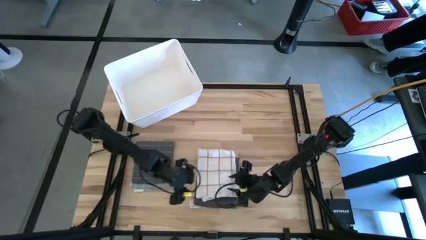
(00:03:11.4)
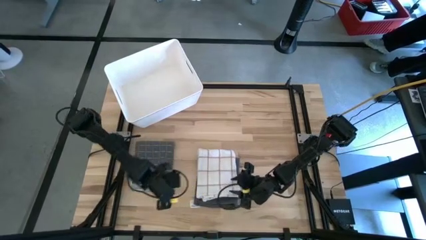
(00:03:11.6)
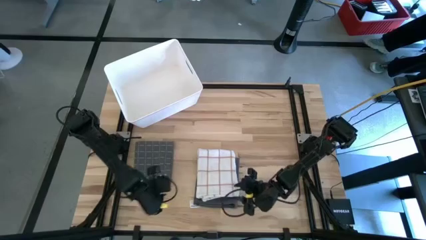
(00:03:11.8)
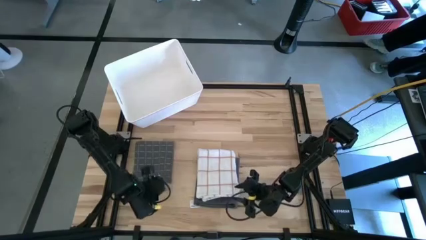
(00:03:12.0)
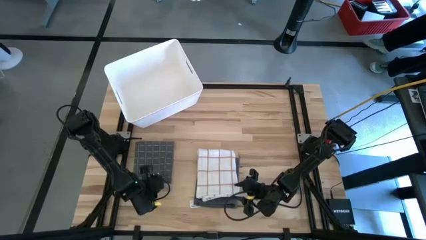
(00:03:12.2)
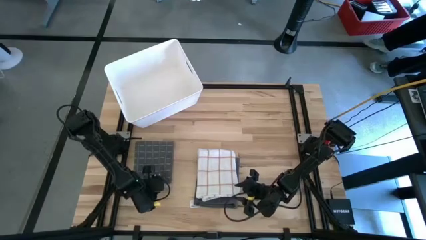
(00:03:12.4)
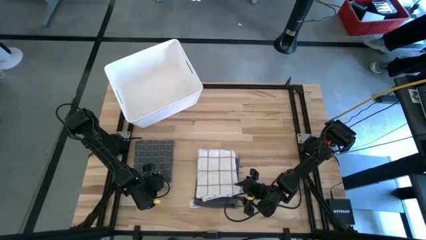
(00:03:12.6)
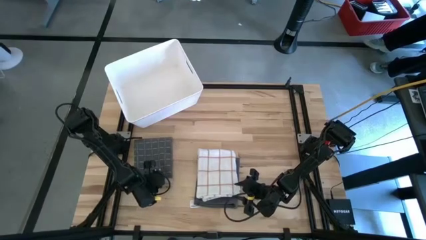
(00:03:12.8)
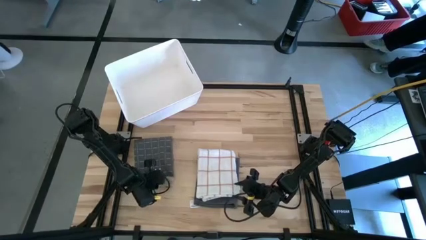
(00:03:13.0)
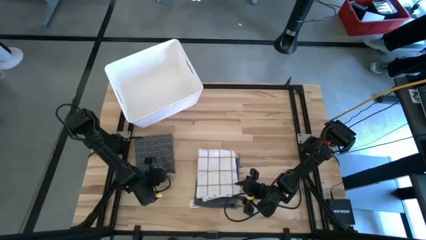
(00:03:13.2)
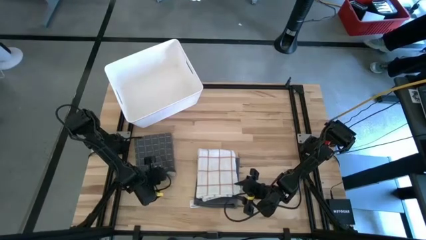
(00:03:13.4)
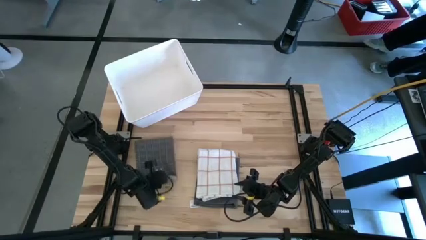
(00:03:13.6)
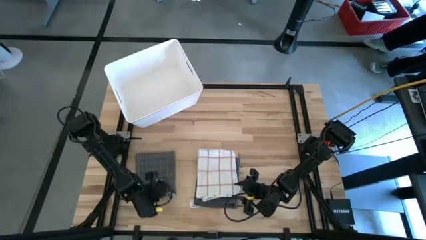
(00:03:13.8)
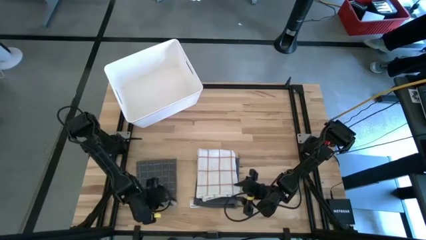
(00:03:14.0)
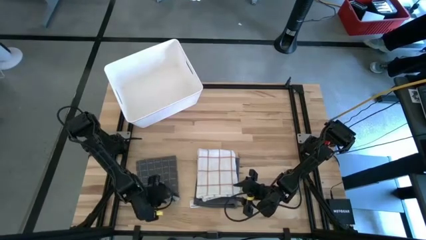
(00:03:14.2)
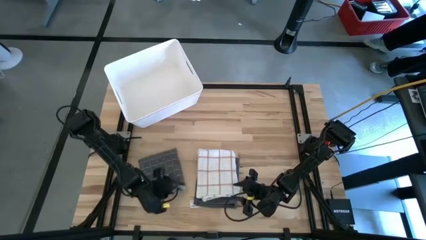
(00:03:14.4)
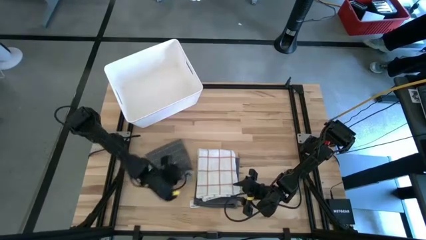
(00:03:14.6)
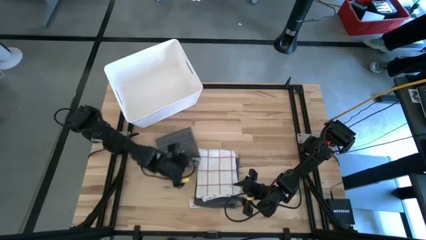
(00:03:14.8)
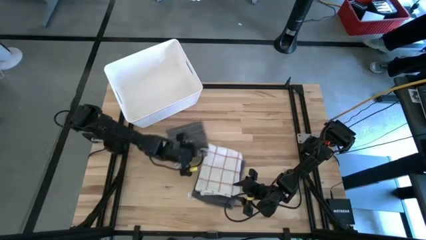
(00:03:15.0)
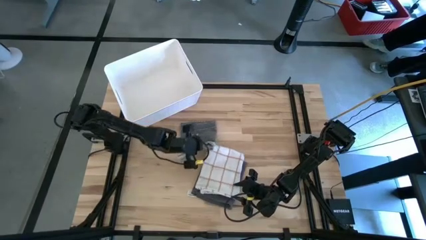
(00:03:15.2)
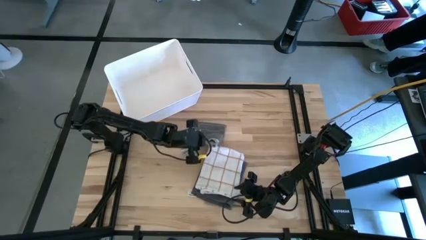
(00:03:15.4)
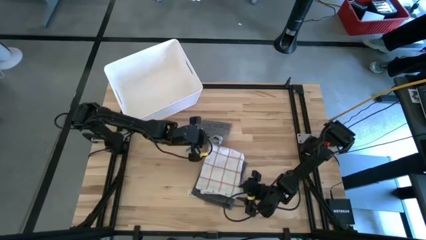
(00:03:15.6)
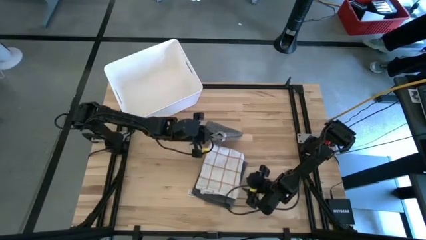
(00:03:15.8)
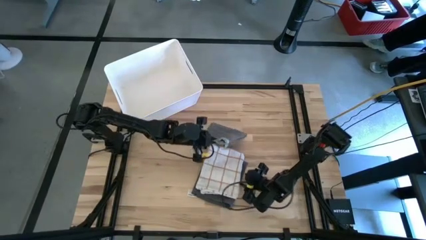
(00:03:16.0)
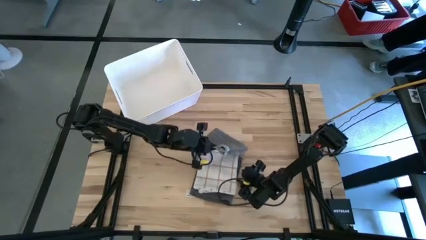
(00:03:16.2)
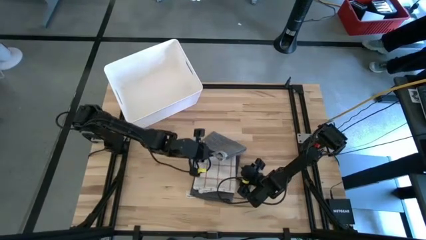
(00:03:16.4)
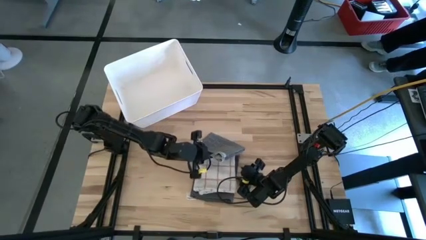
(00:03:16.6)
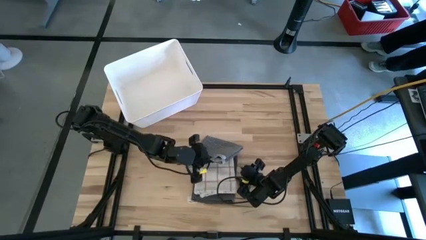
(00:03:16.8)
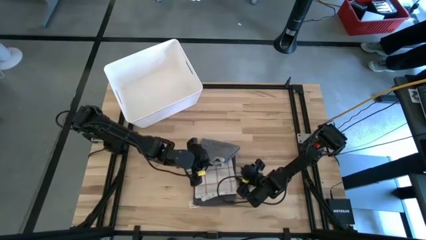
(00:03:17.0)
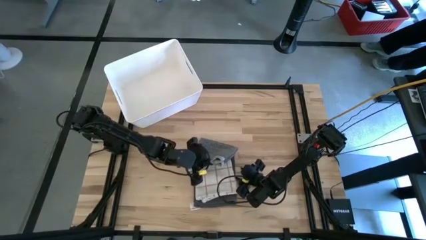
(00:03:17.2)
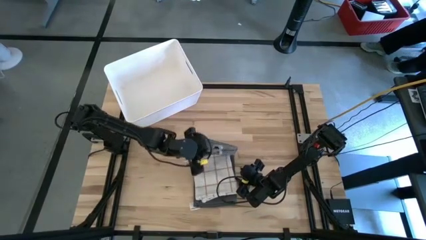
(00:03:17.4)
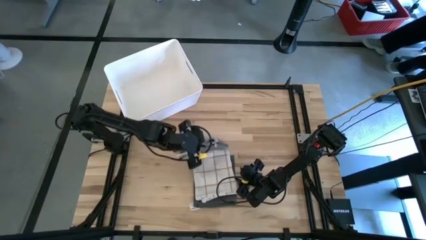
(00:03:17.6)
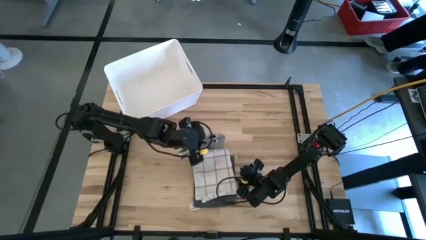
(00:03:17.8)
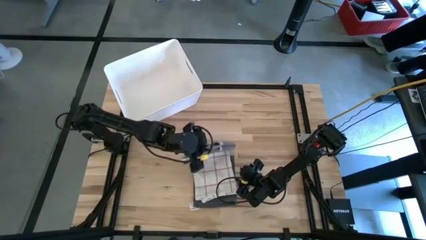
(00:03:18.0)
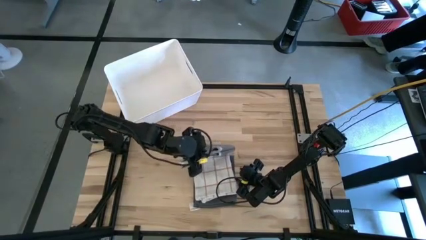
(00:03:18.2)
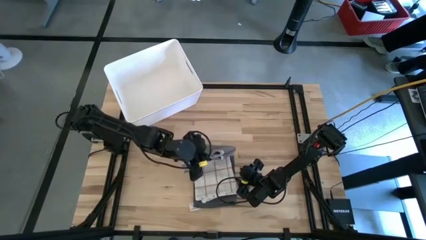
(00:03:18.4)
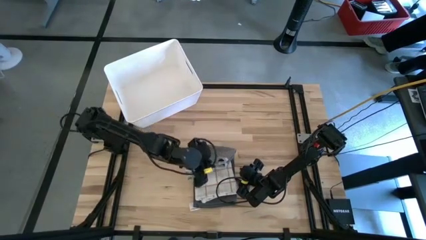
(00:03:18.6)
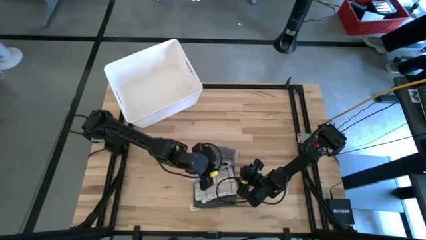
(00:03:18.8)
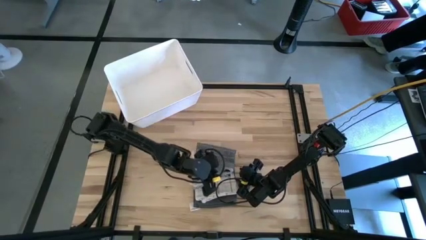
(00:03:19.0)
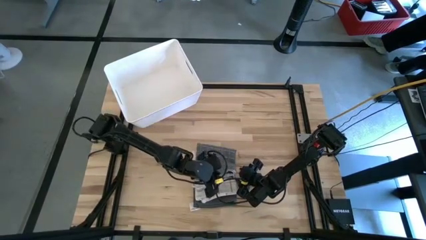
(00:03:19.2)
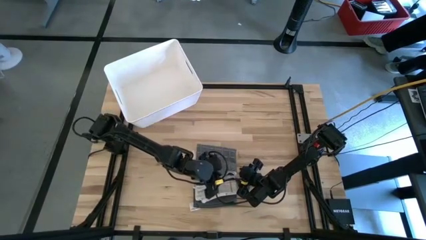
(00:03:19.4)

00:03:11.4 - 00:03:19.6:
Task: Fold towel
Stack the folded gray checkered towel on top of the folded brown-white towel

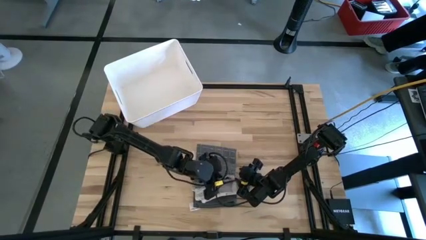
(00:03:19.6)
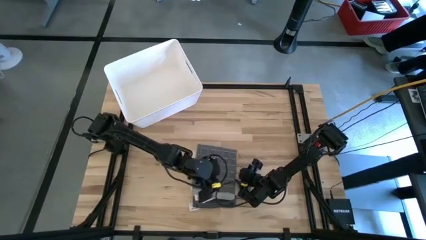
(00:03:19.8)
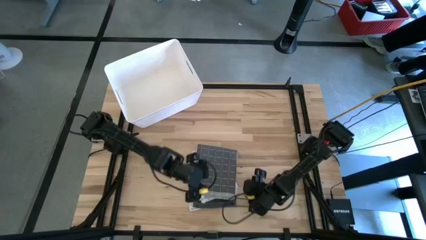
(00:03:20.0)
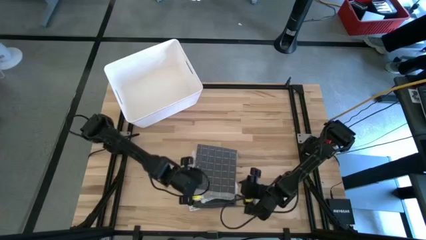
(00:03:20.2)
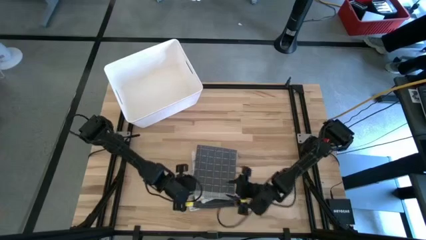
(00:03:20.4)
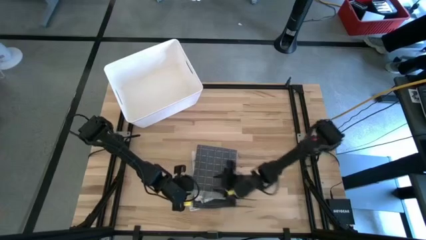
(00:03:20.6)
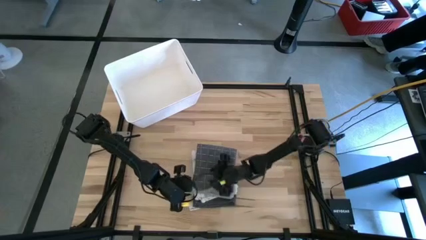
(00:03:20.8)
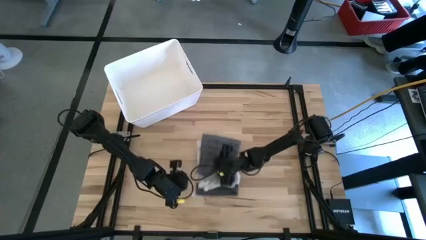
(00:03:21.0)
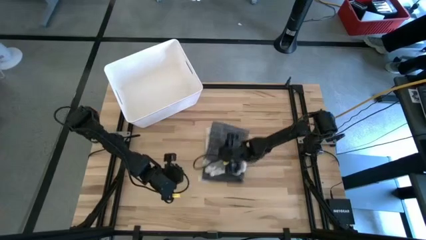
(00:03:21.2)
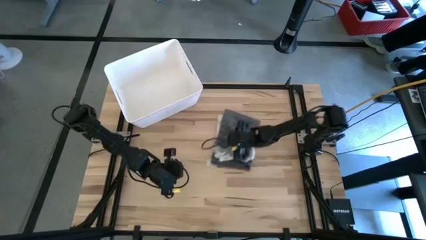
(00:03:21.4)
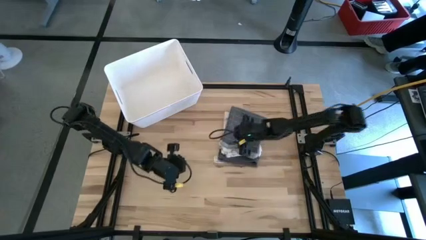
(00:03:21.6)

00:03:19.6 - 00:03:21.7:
Move the stacked towels to the top right of the table

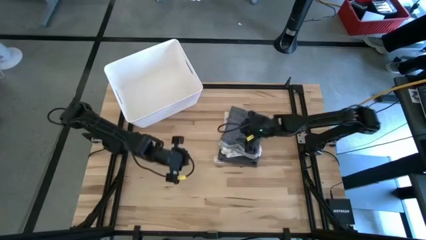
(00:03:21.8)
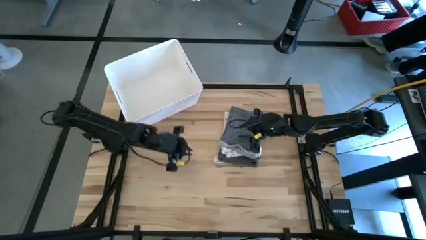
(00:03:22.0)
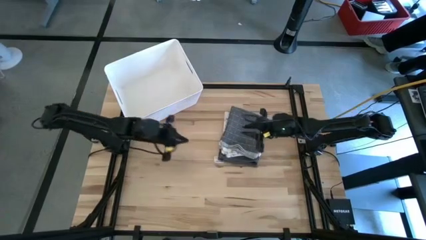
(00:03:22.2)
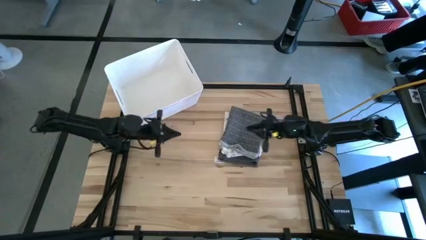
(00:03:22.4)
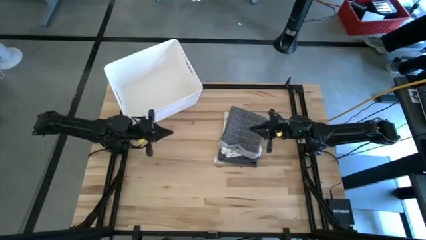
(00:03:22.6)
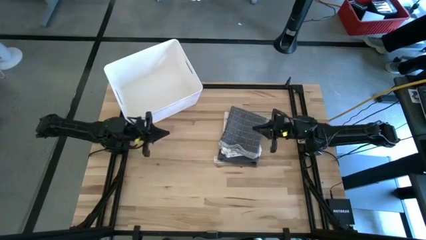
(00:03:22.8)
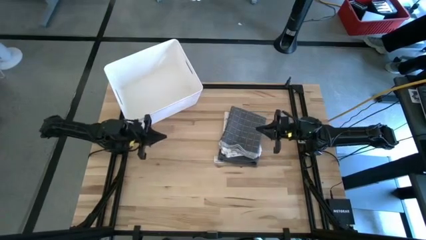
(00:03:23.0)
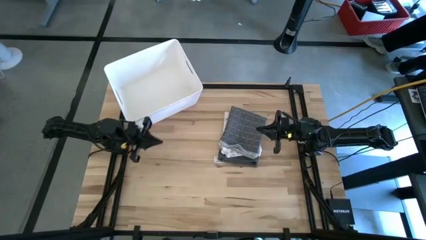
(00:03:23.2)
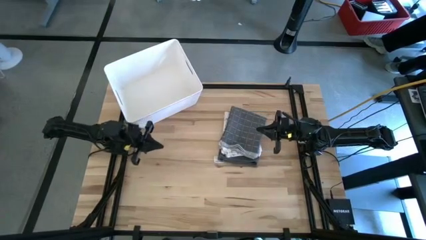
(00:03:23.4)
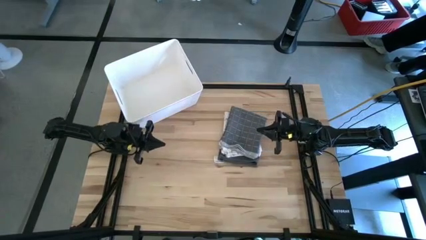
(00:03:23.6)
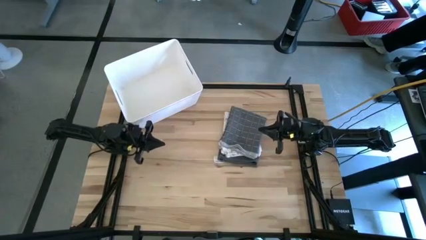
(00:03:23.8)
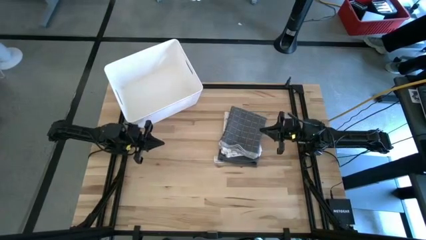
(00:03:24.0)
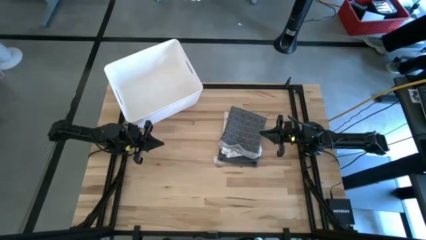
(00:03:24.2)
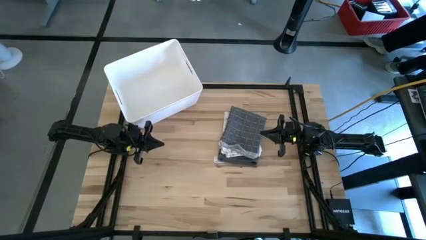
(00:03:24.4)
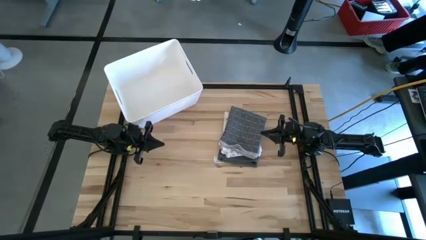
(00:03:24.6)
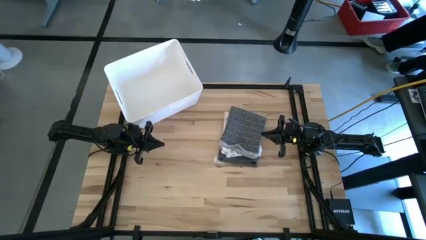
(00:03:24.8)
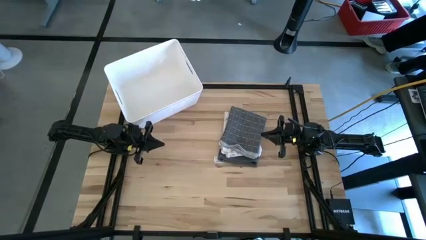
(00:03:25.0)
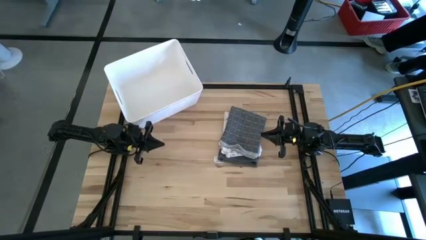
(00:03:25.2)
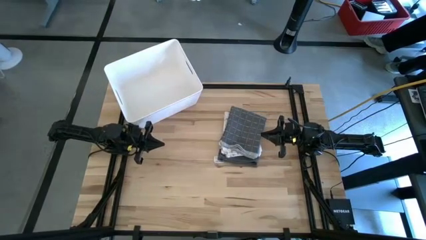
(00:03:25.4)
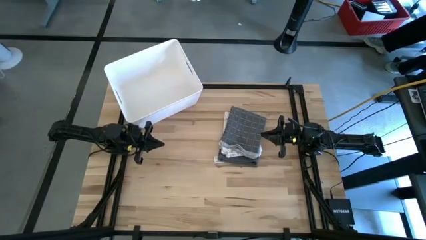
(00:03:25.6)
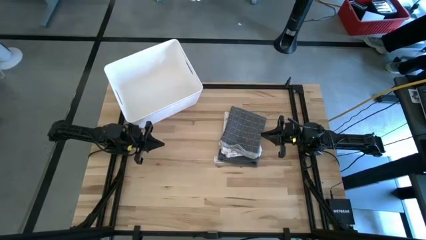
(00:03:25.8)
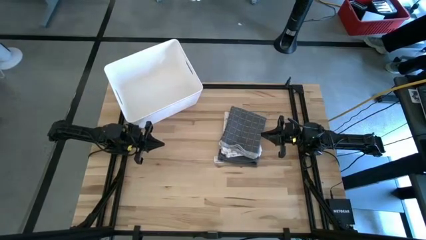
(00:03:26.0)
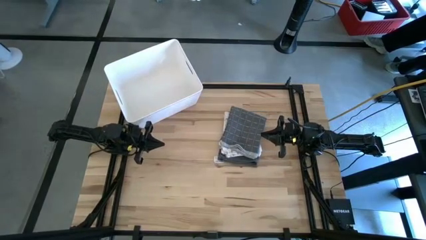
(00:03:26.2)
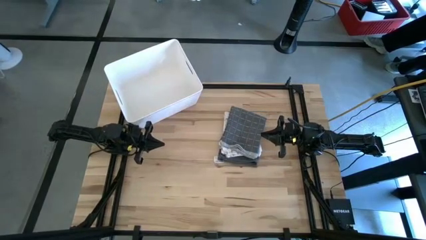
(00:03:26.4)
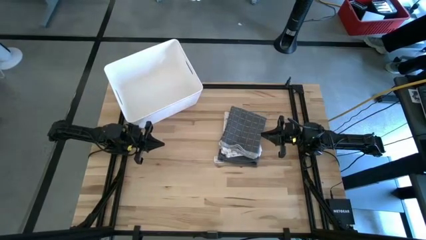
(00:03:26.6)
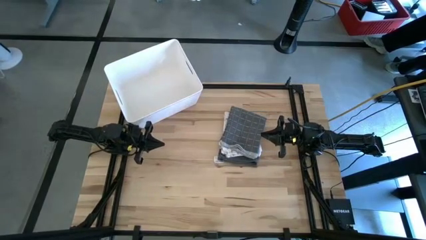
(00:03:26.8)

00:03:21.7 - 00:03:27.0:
Return to Home Position

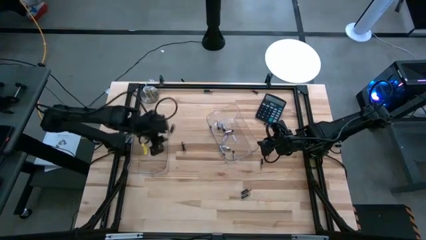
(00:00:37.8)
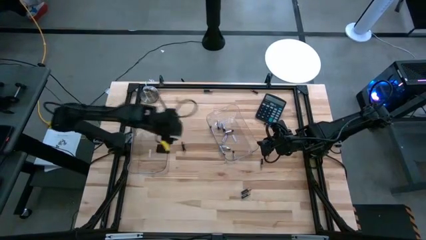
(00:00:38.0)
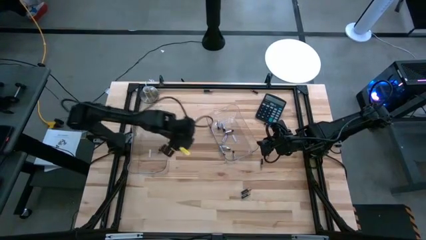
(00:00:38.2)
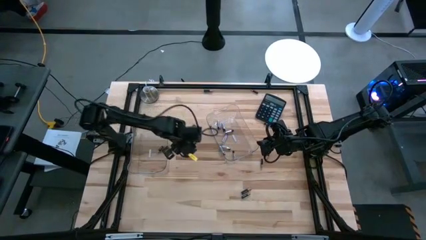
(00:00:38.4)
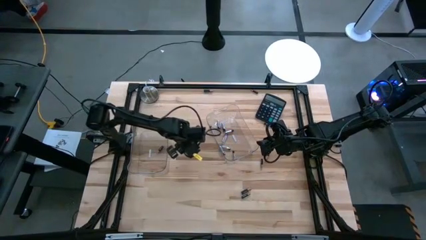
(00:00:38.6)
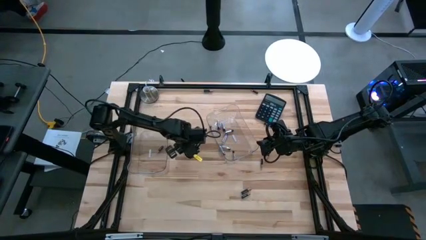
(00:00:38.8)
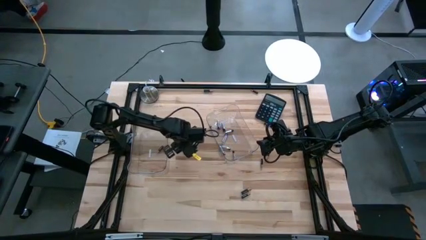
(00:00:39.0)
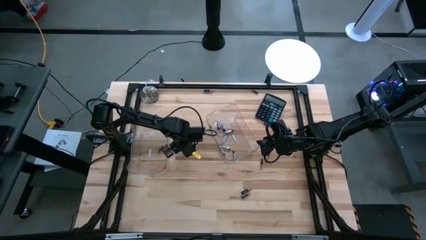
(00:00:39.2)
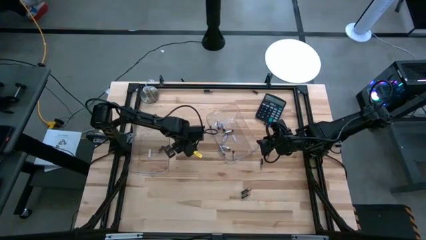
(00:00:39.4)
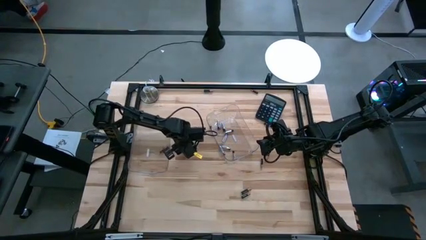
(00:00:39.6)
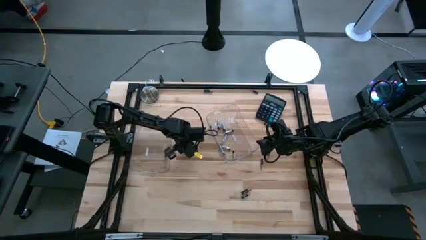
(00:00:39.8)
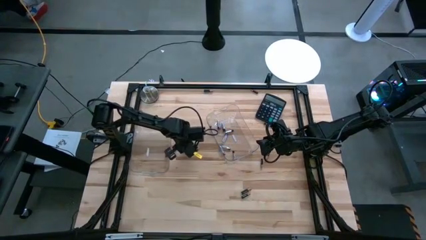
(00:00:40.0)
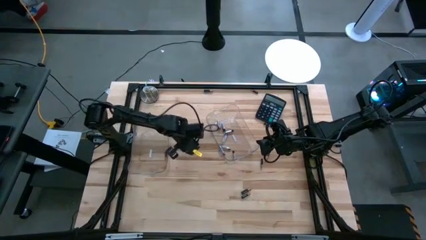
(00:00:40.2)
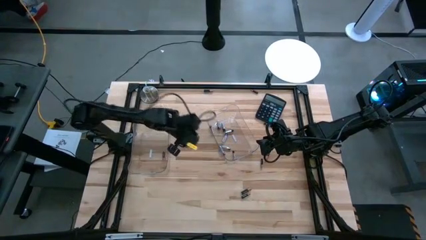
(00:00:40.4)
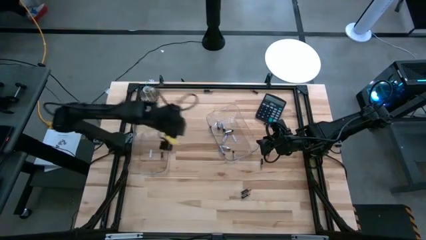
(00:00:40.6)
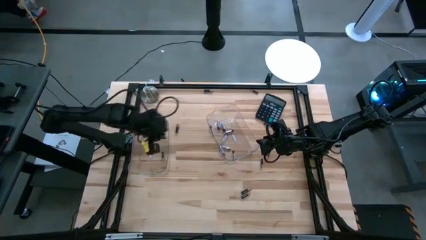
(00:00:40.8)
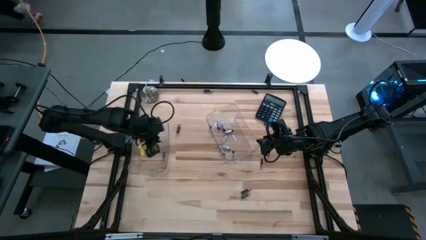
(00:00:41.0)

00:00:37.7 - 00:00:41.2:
Task: Sort batteries
Put the black battery into the left transparent bin
